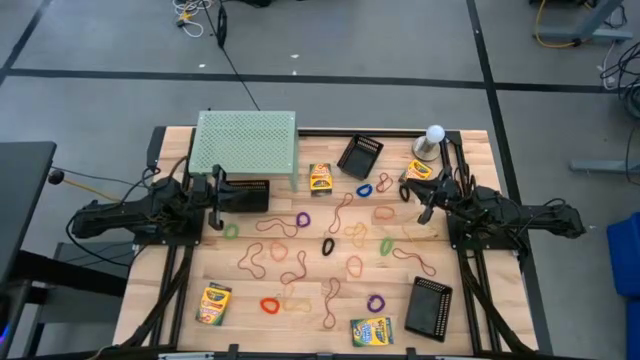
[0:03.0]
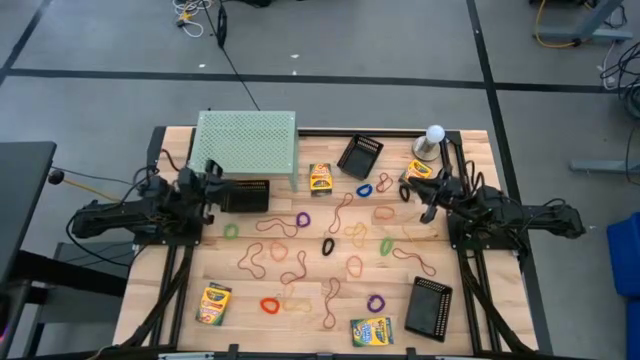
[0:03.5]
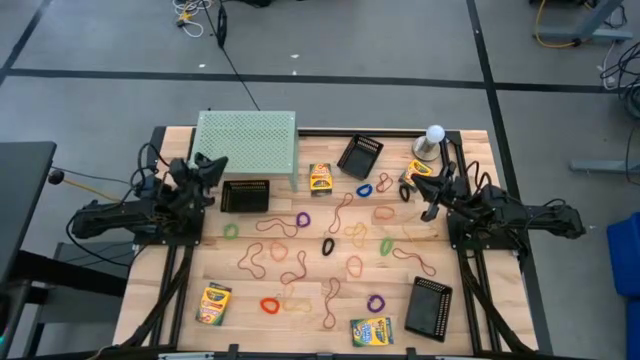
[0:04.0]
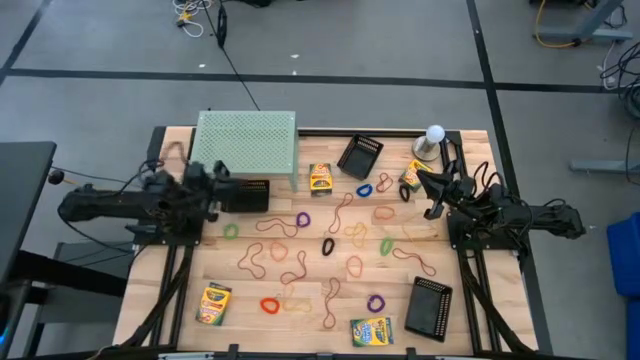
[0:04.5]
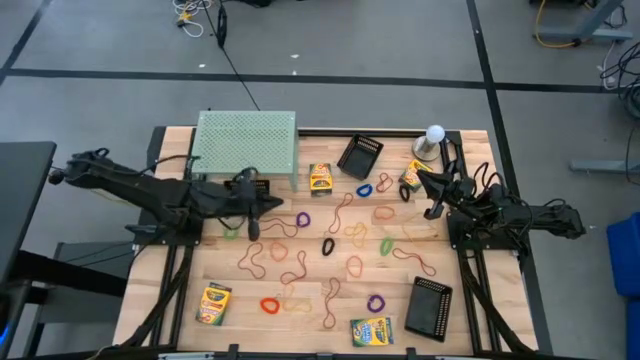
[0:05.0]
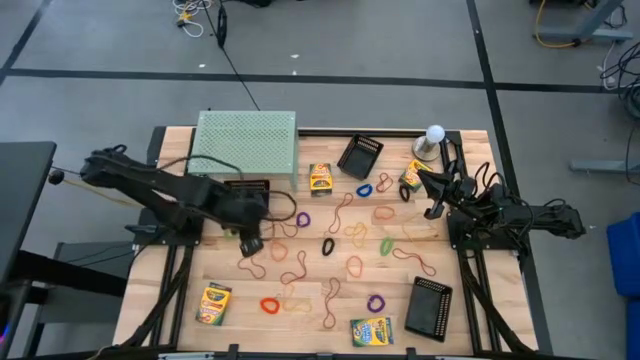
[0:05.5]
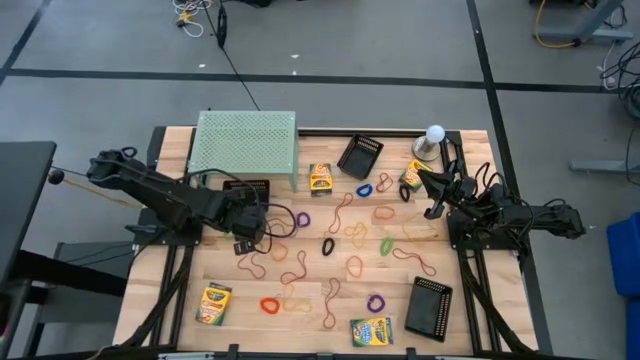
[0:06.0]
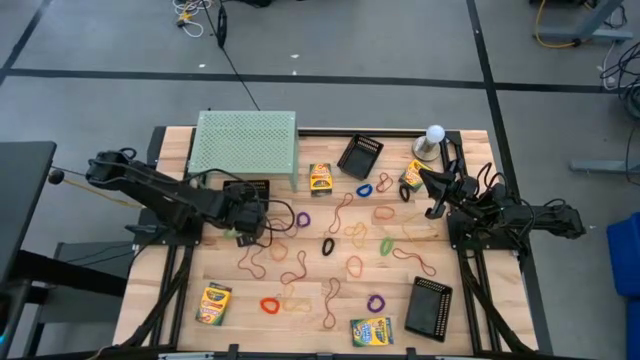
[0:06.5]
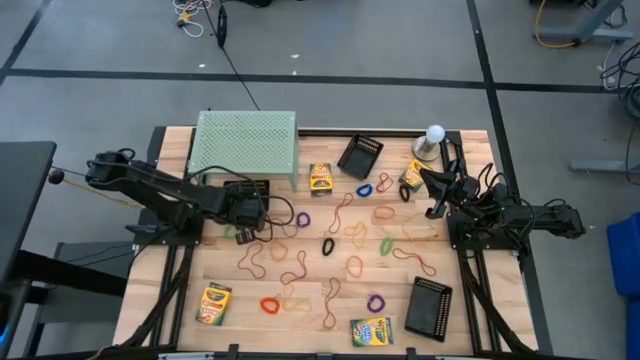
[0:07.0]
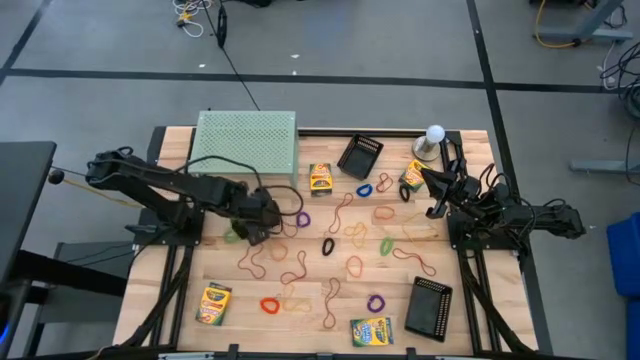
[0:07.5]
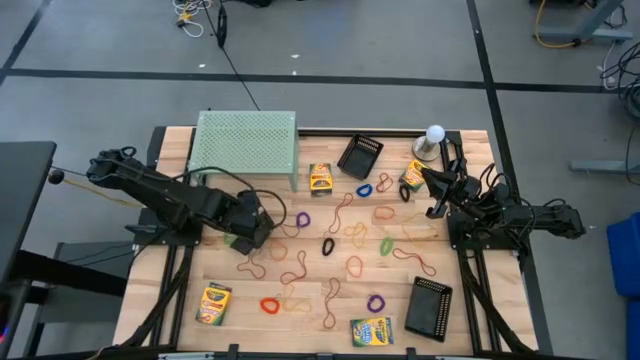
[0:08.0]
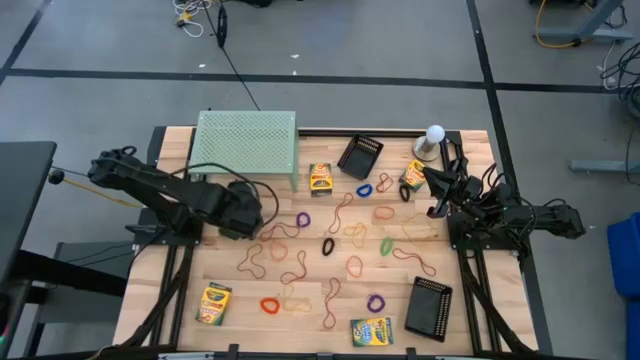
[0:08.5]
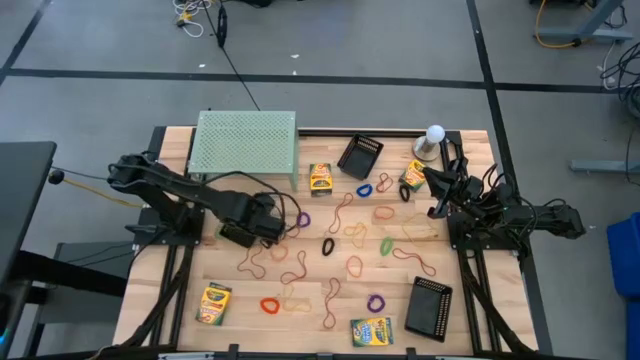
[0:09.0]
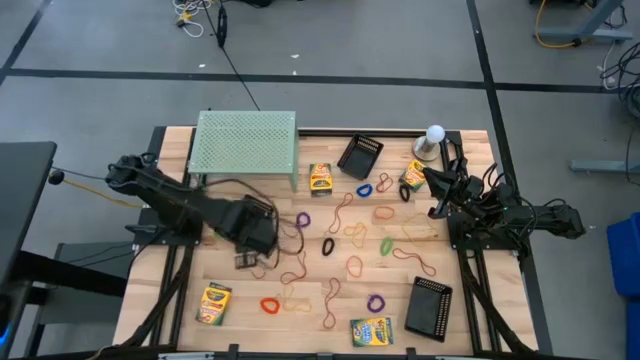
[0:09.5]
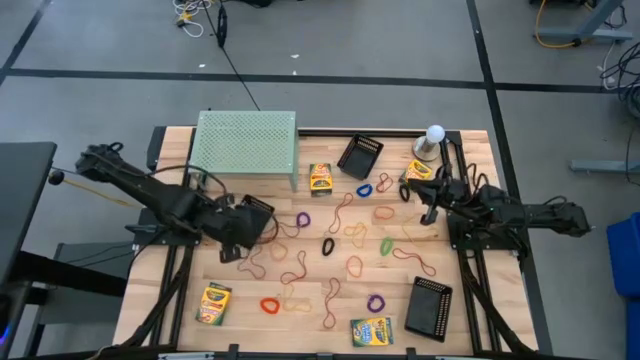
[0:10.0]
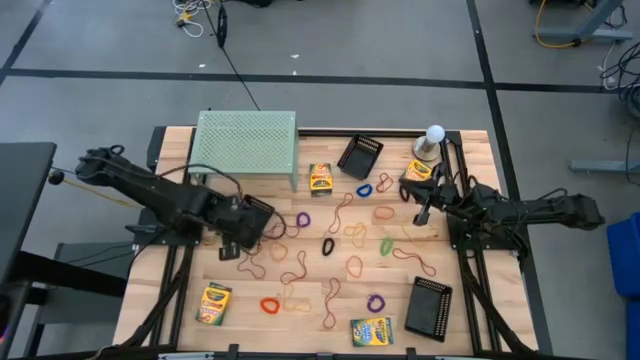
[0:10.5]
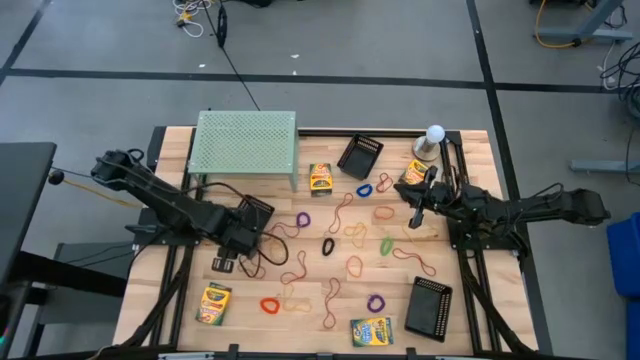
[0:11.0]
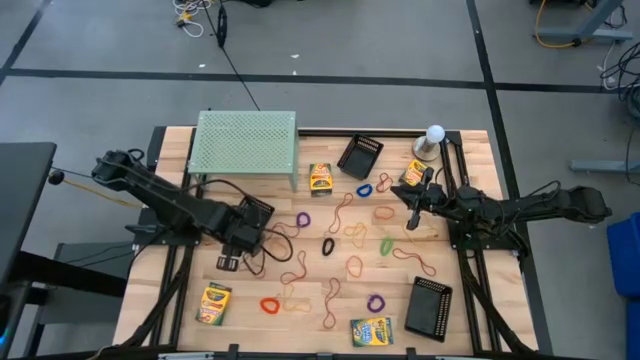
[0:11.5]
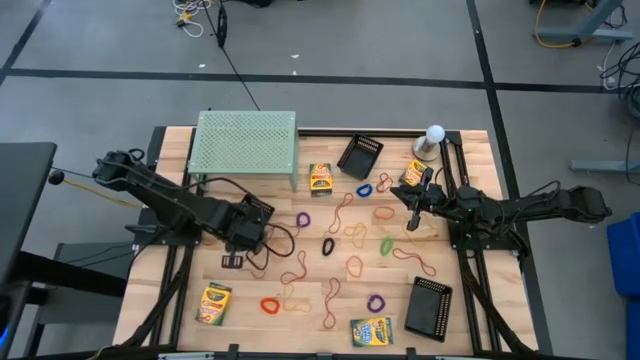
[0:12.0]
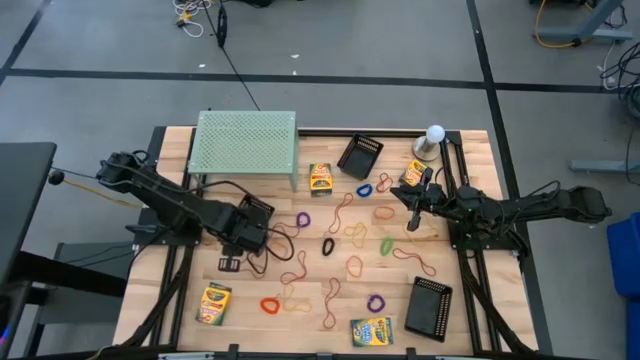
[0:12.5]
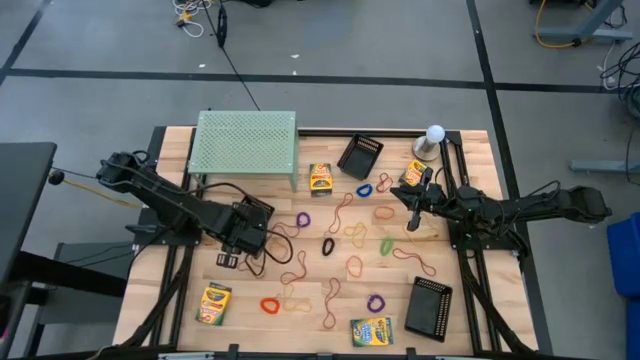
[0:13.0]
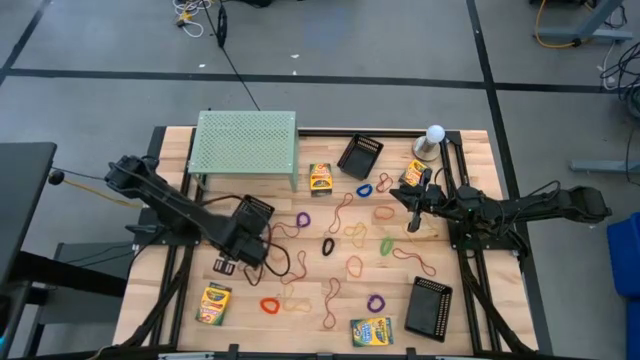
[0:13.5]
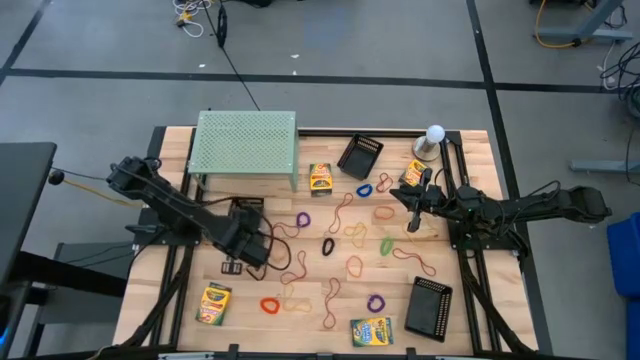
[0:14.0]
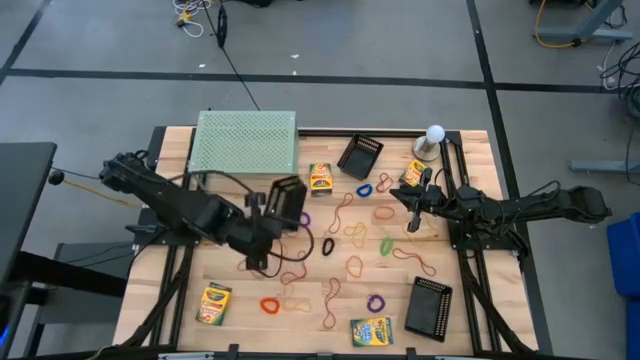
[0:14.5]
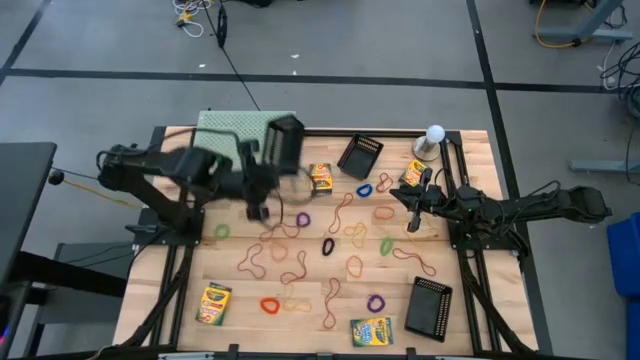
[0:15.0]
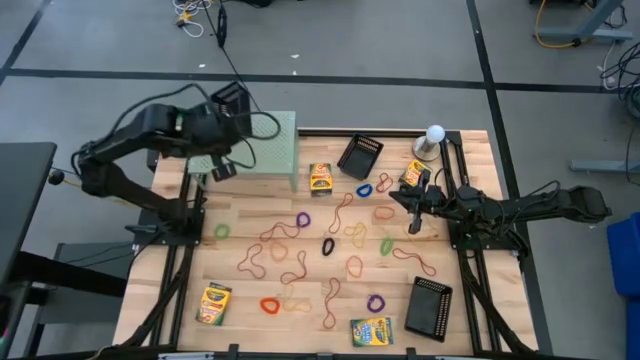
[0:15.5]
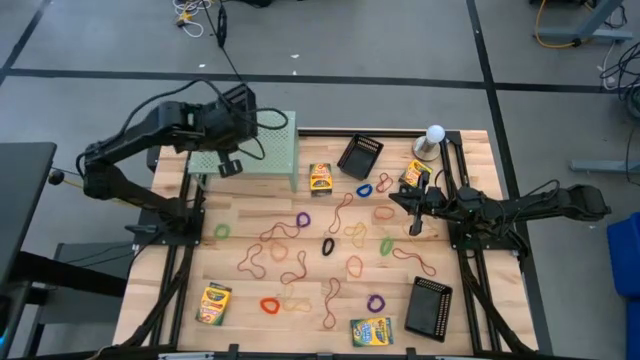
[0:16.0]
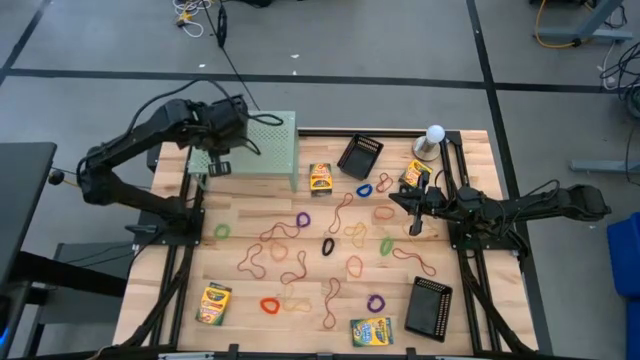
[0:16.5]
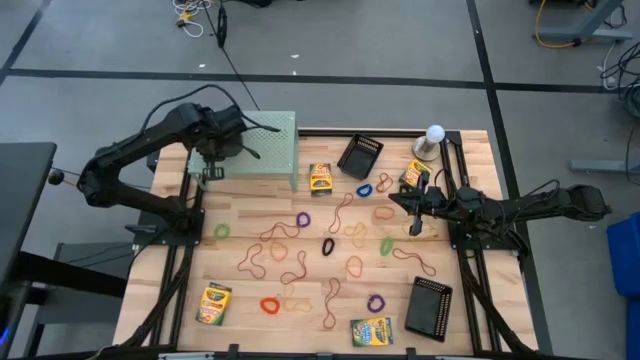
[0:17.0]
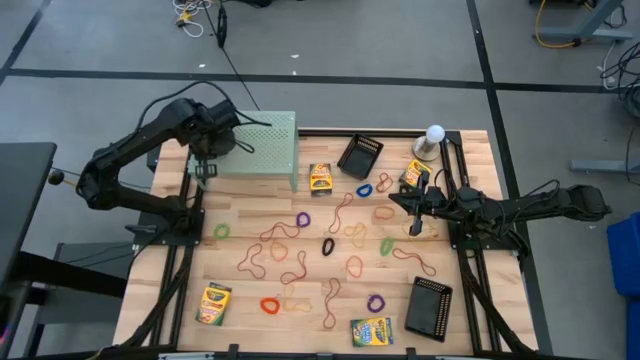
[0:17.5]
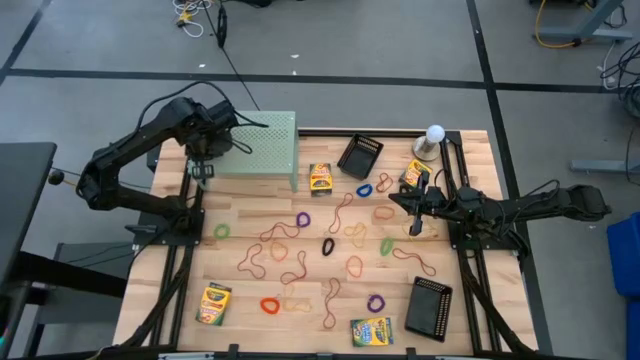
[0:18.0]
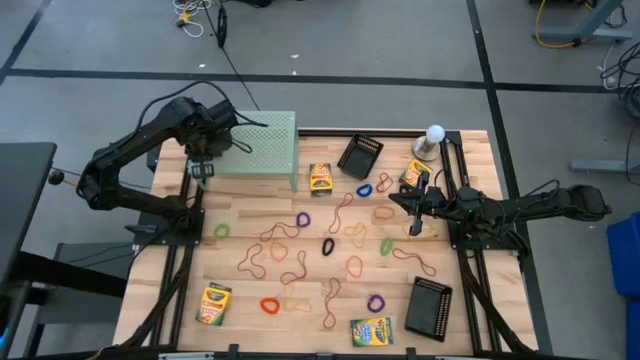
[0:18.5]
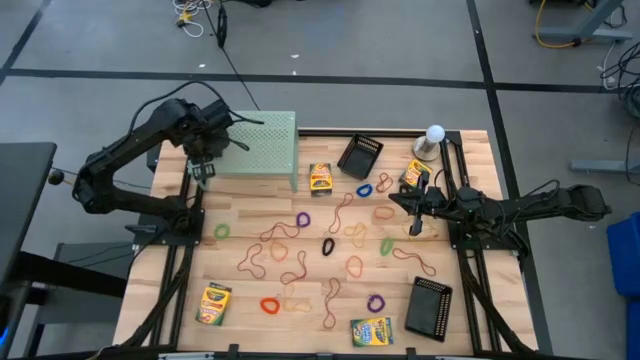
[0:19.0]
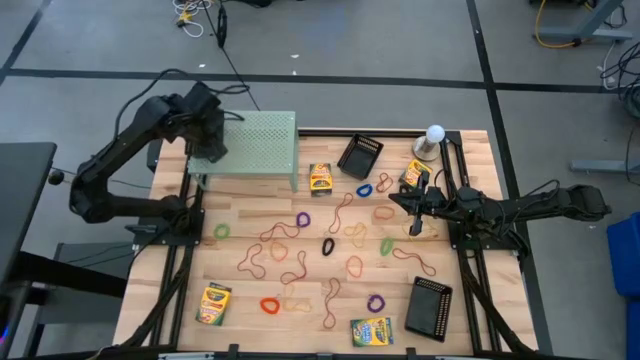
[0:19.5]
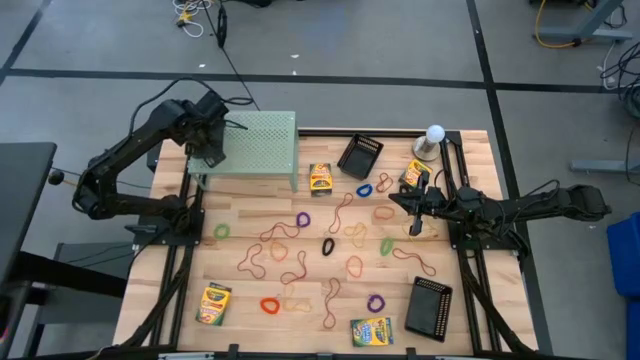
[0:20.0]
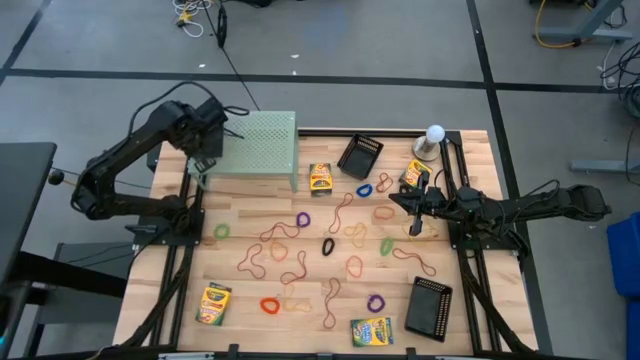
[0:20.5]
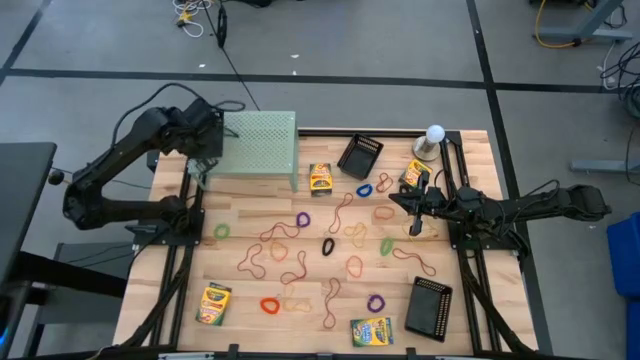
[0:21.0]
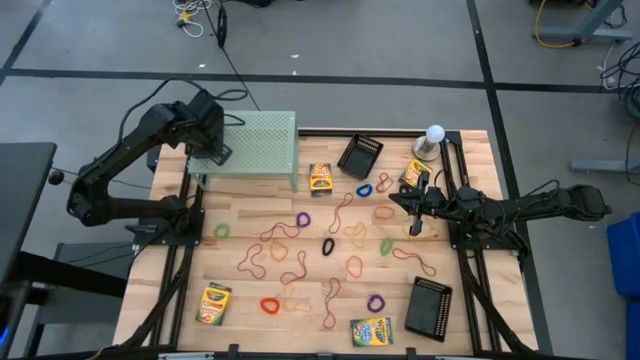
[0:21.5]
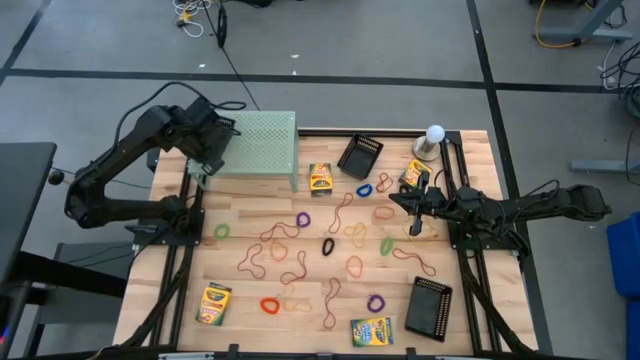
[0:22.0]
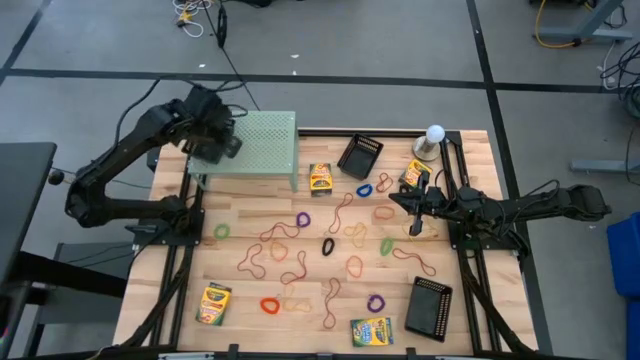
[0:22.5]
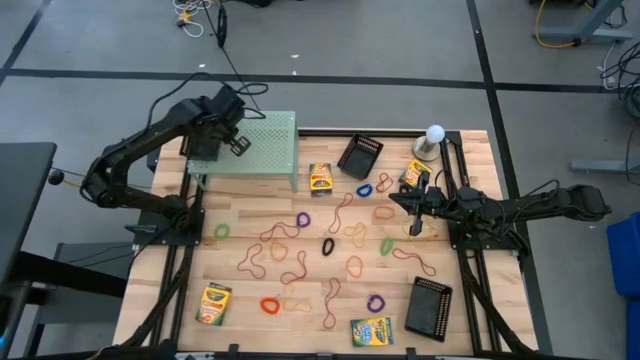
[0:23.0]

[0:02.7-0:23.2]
Task: Pick & Place Office Desk Supplies
Put the black bin on the shelf
